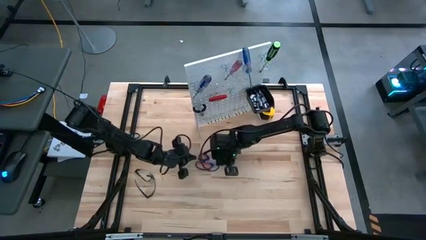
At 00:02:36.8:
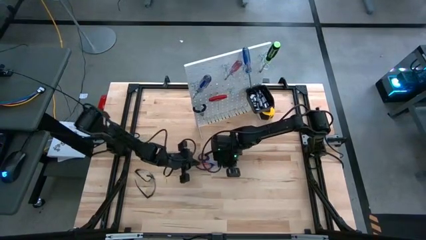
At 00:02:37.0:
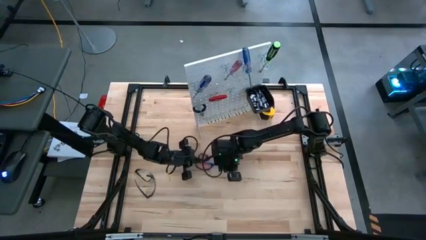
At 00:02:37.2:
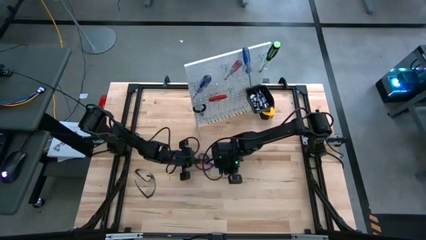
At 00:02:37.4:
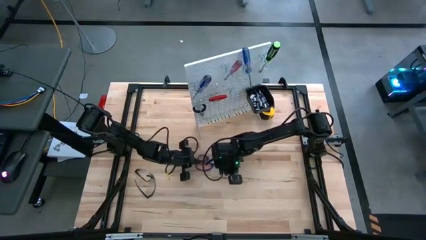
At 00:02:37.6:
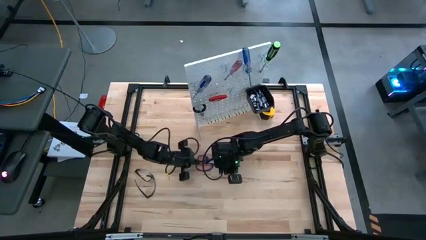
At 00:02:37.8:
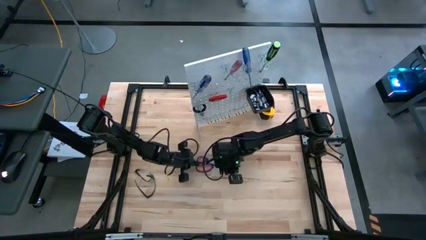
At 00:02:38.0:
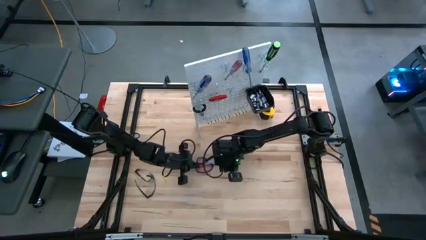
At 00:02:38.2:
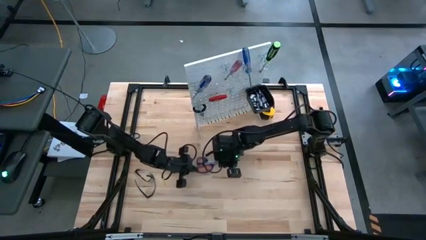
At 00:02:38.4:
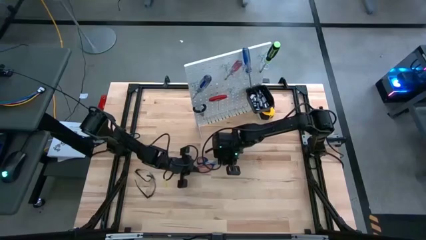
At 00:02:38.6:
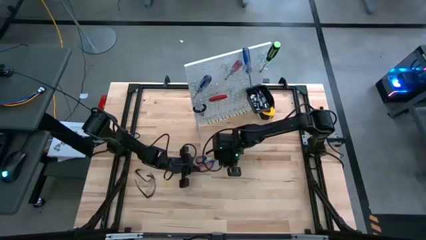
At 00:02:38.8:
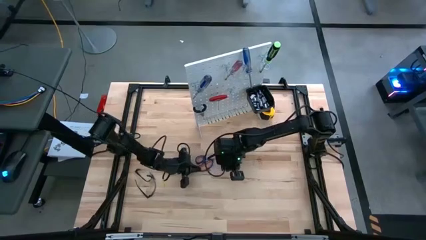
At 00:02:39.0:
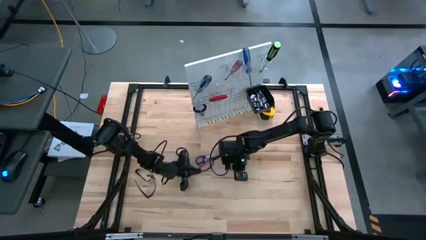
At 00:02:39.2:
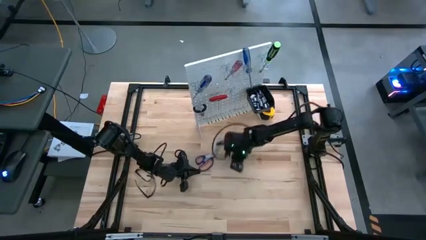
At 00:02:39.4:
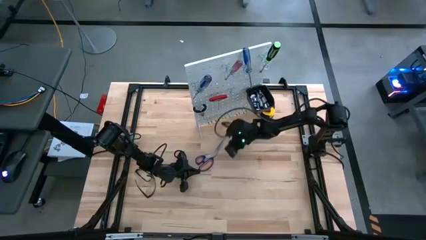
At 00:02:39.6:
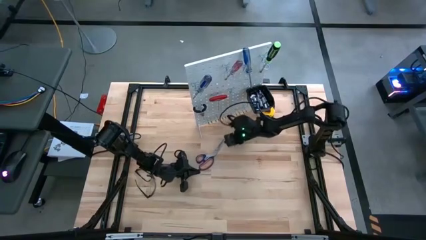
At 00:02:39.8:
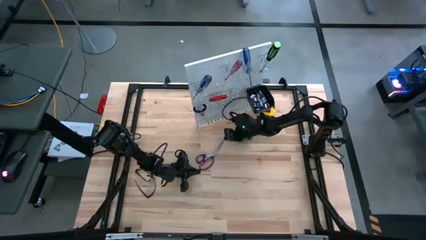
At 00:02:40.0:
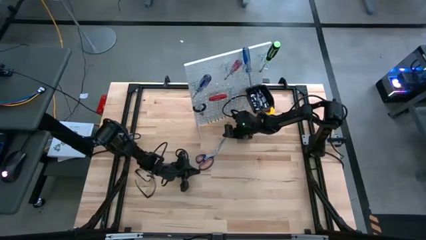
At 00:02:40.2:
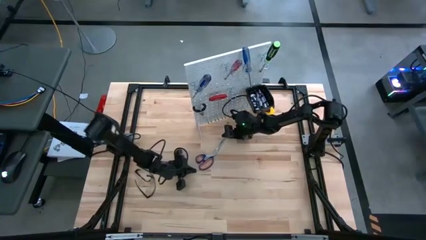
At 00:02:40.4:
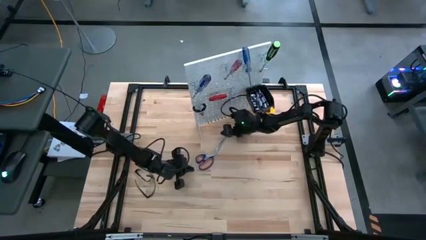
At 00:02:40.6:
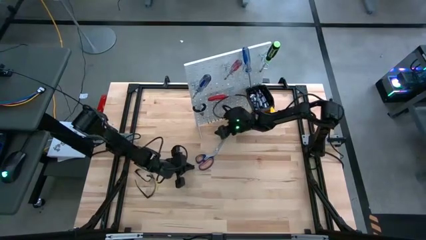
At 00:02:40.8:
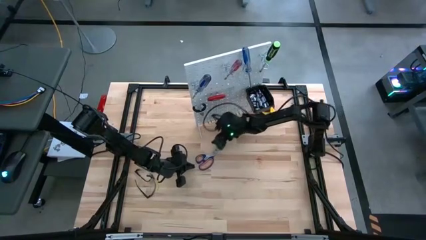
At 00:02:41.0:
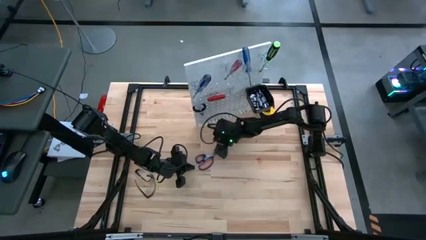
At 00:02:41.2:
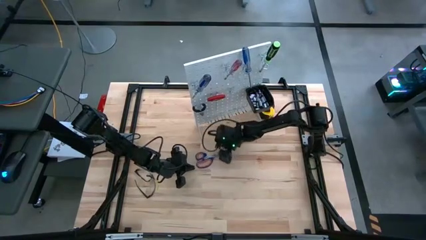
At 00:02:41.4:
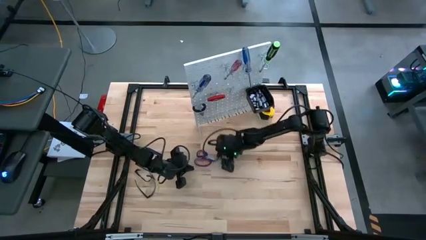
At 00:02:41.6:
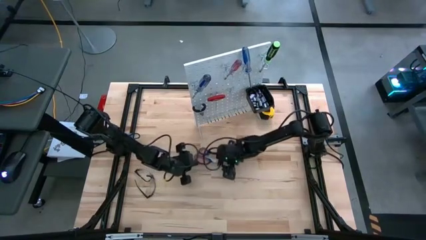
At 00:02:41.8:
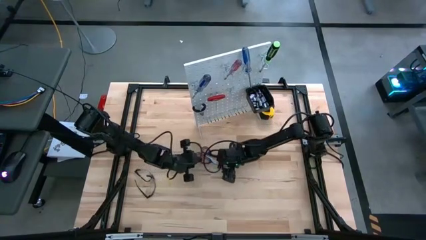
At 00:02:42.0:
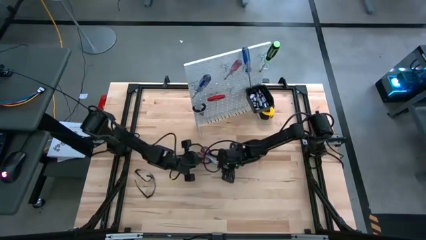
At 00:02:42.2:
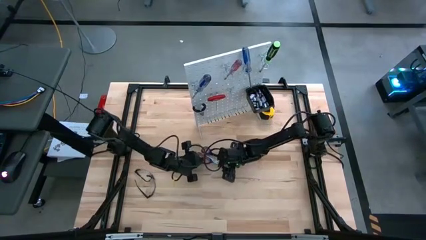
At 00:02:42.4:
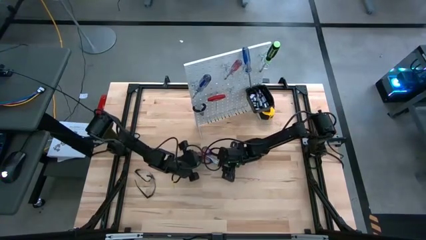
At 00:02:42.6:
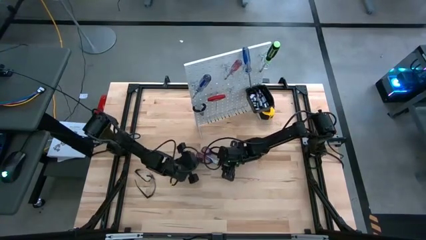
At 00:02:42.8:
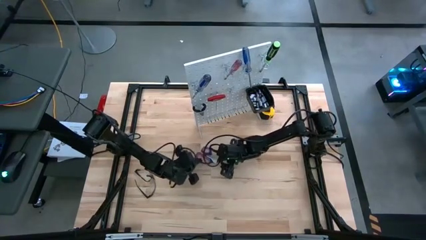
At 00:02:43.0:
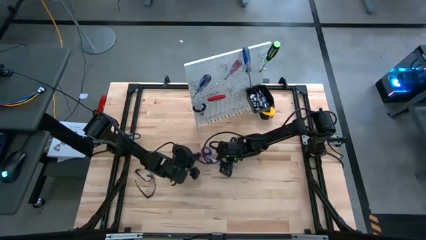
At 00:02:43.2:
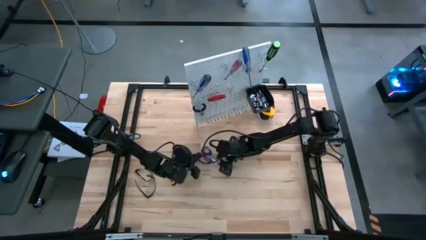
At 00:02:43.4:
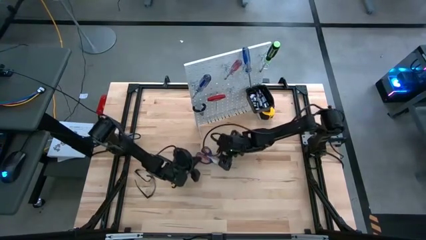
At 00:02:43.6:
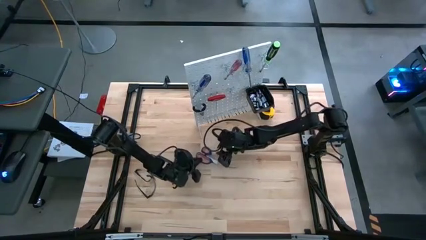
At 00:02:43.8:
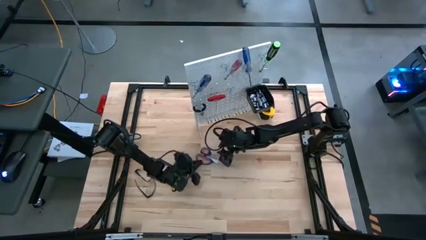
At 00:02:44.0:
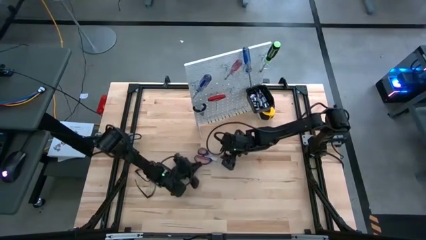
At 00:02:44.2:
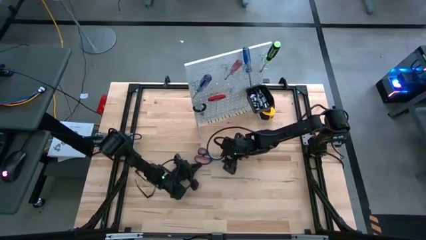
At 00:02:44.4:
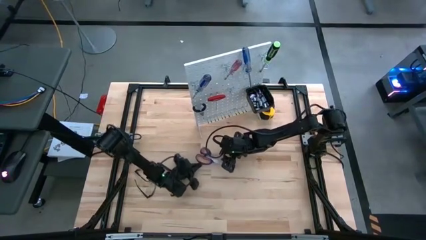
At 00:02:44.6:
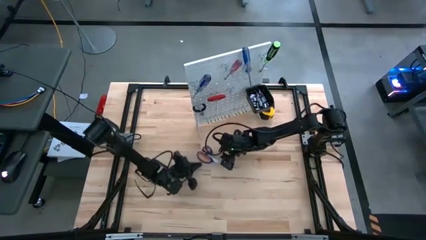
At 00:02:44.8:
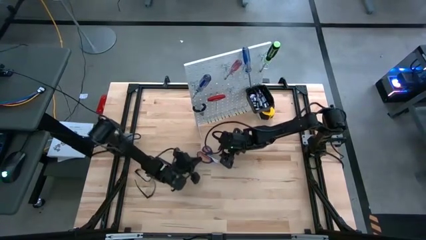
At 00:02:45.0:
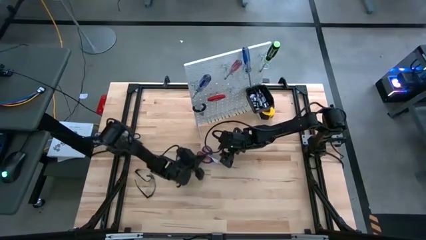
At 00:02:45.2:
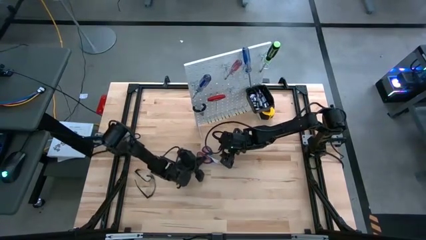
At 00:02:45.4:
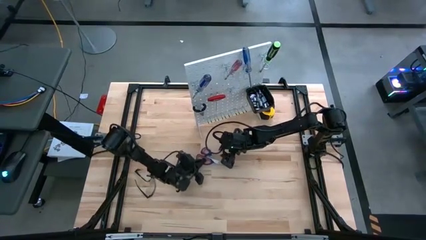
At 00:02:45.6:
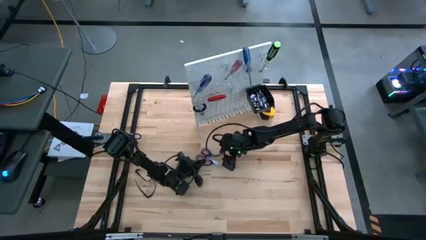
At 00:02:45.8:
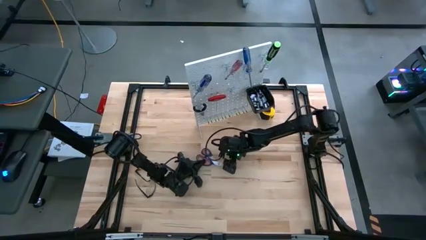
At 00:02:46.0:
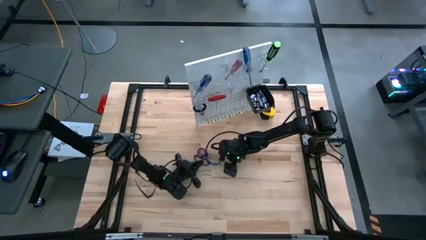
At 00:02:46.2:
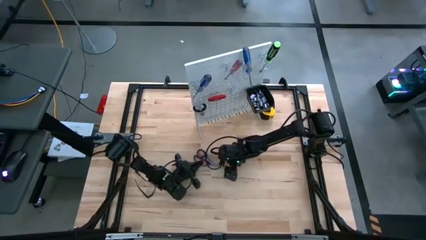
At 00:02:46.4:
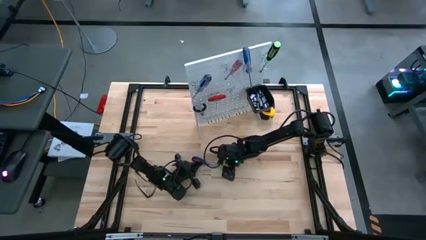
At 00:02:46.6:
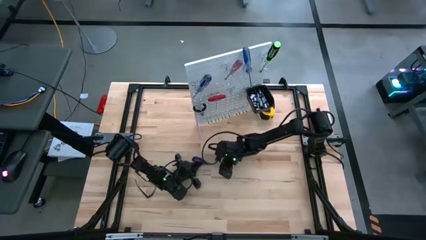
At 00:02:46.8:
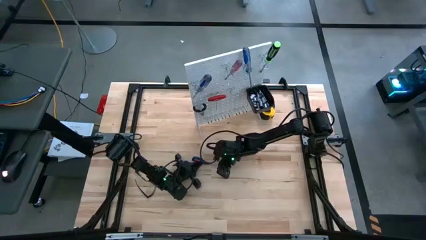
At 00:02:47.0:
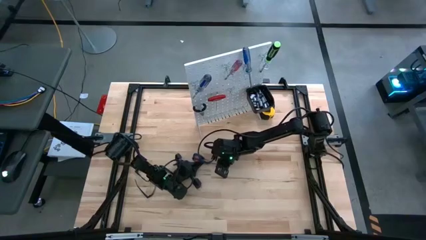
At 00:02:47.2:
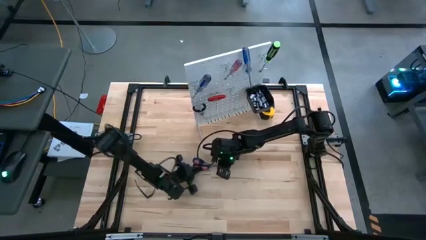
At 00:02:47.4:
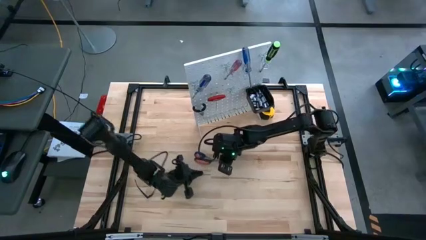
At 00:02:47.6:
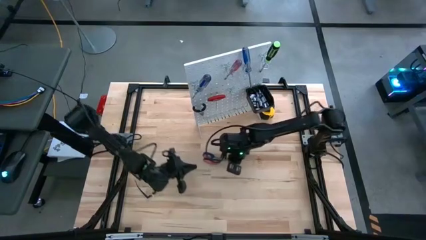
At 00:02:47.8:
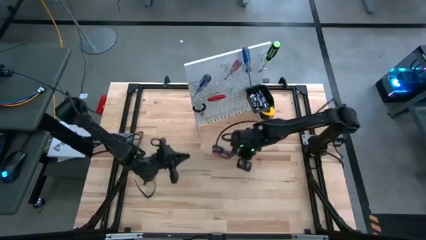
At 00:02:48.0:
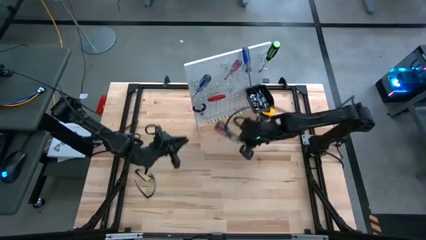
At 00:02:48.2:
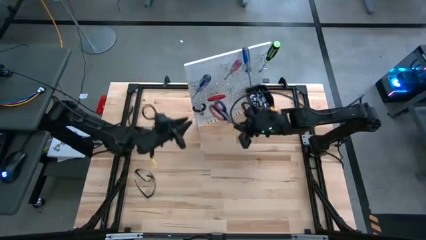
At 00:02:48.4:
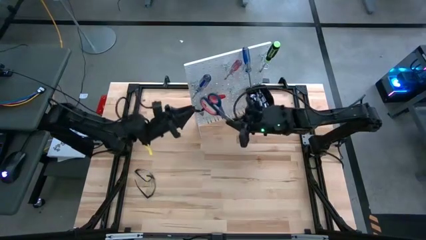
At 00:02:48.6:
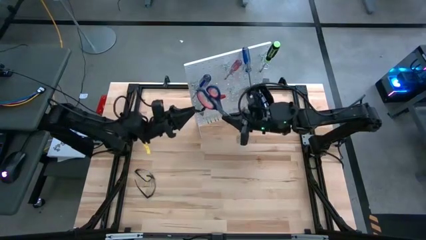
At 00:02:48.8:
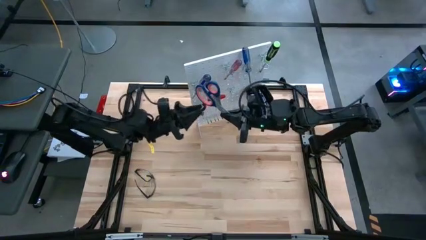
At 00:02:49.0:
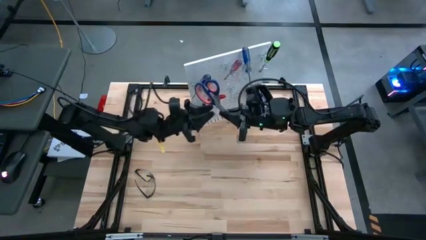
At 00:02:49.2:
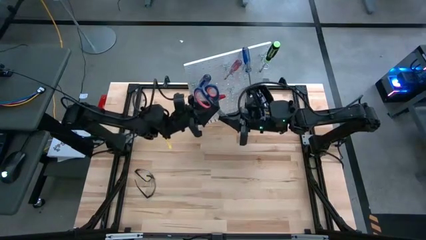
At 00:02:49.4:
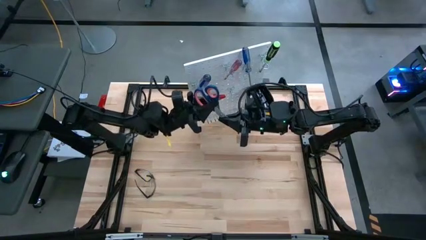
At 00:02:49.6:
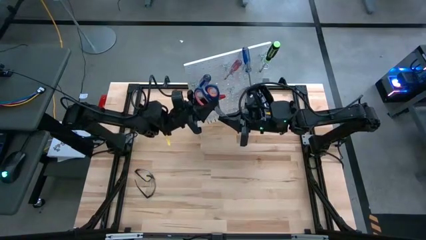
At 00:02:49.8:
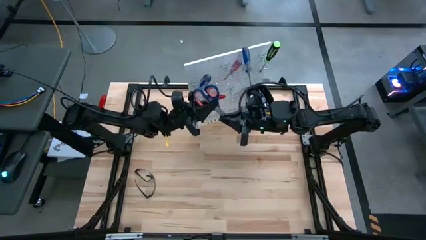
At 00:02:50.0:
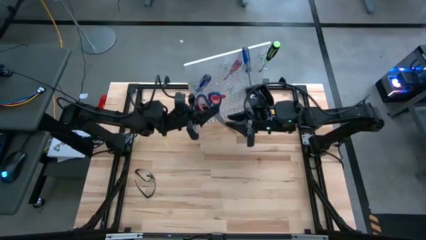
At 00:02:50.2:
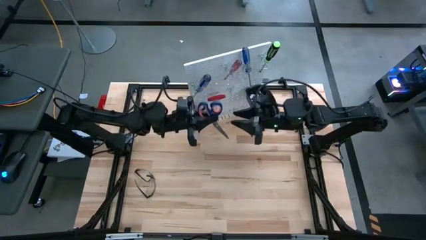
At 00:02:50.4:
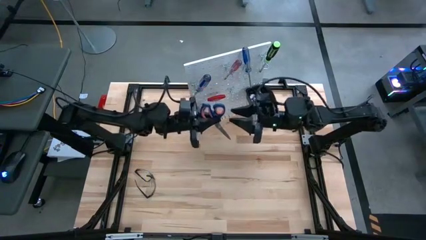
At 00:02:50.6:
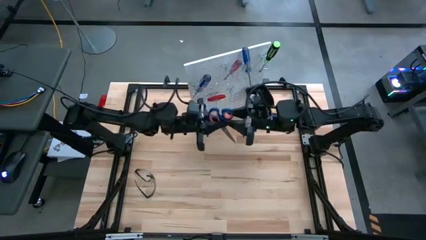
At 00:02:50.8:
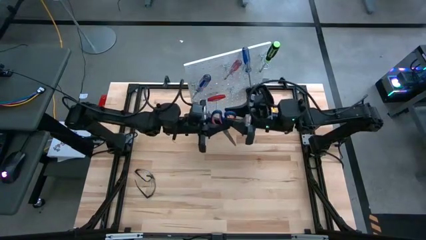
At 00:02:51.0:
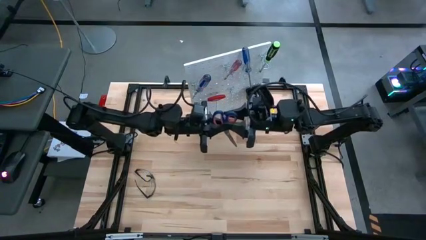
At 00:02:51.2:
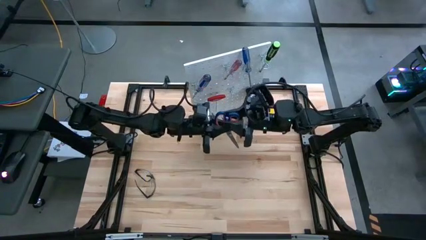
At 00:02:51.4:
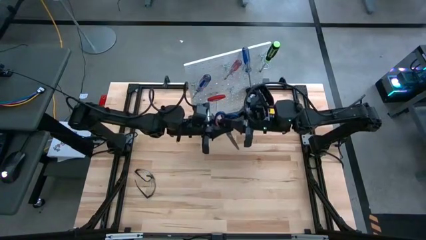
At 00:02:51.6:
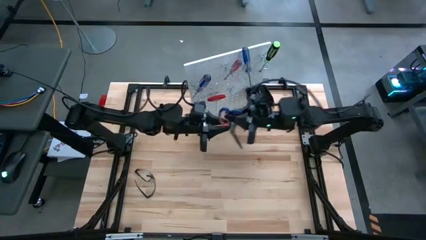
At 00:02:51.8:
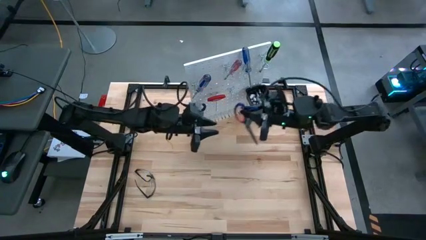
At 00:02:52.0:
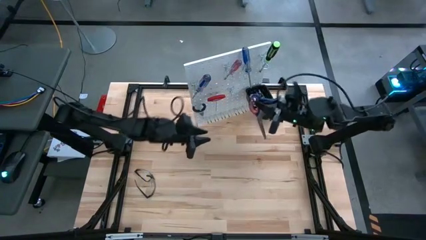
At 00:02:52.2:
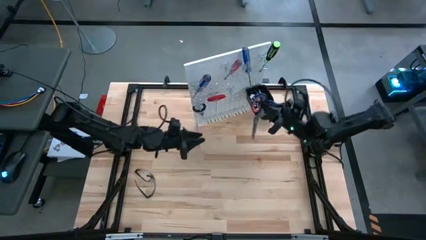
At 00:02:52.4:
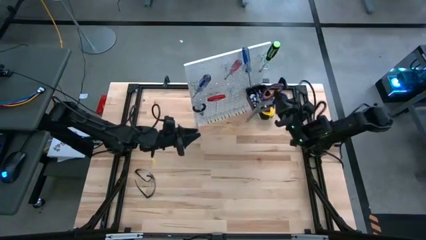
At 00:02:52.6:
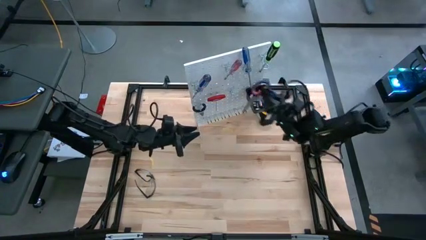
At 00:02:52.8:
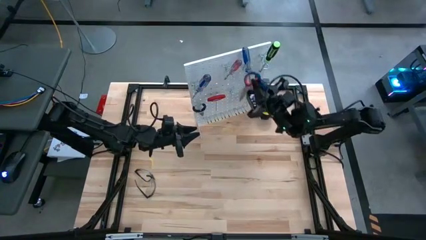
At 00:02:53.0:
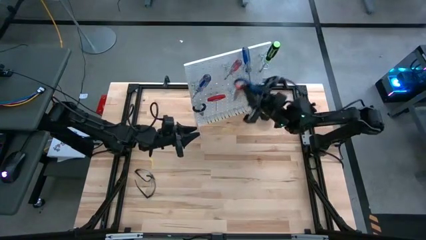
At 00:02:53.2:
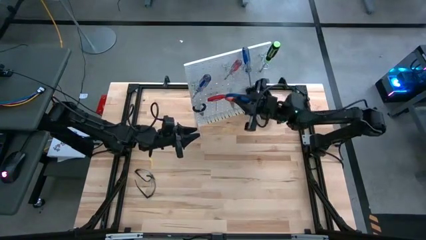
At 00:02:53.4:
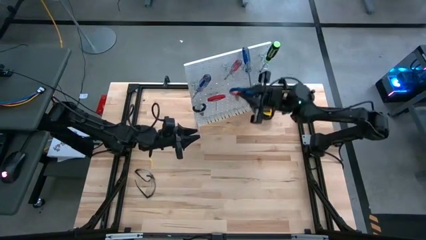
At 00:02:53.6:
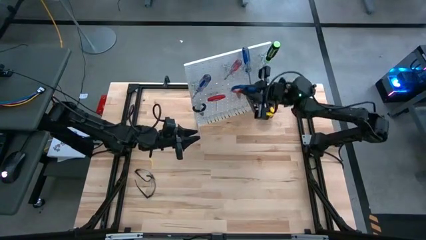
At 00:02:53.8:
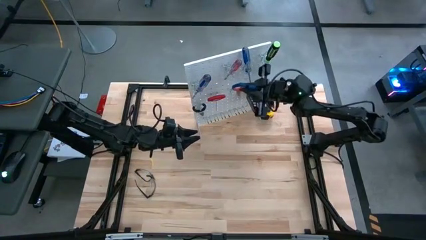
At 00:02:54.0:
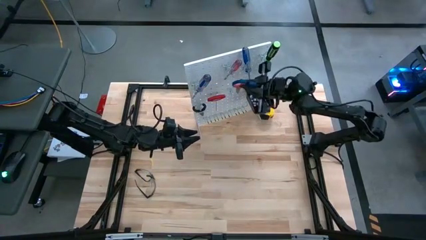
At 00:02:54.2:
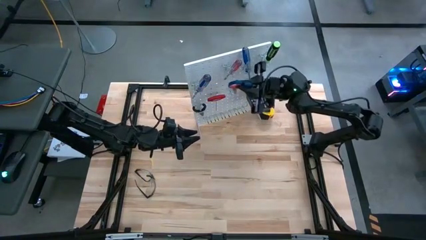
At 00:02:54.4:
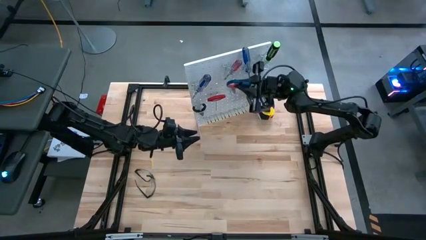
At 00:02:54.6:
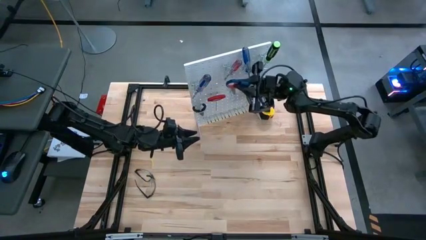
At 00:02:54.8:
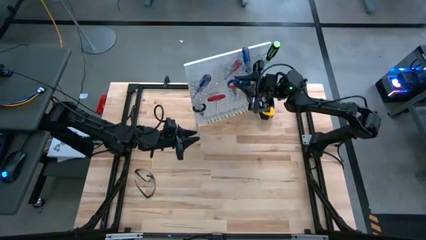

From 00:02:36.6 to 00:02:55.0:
Task: Hang tools onto peg board
Hang the blue scissors on the peg board
